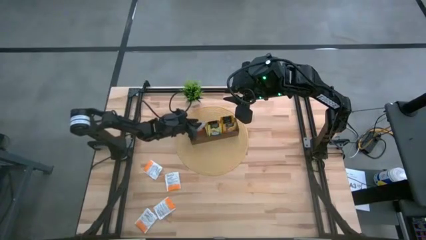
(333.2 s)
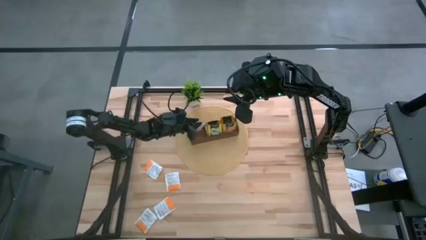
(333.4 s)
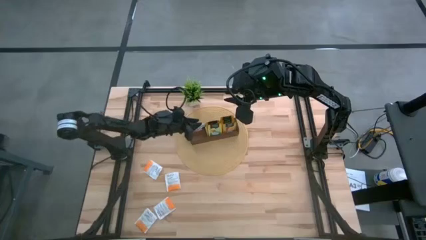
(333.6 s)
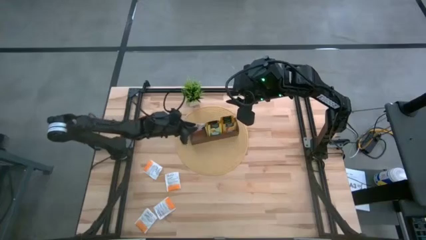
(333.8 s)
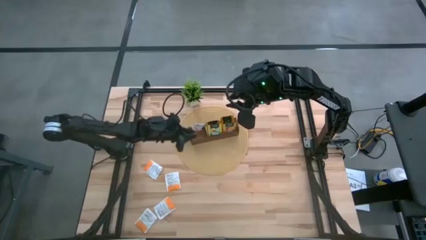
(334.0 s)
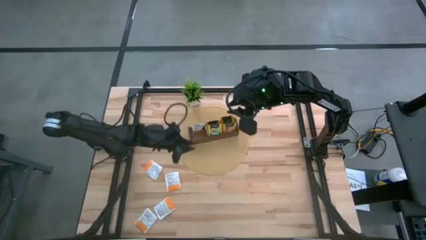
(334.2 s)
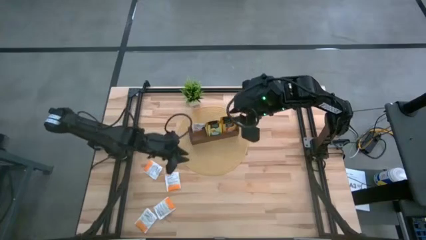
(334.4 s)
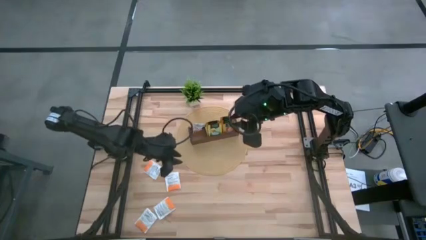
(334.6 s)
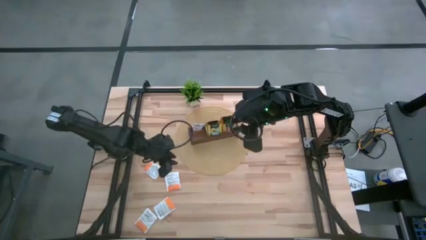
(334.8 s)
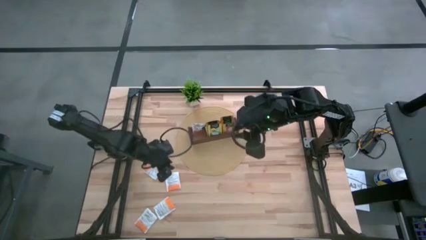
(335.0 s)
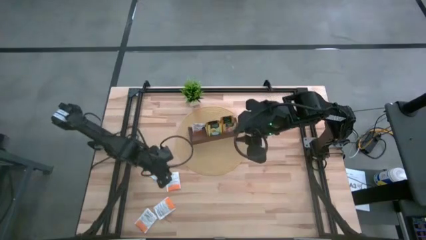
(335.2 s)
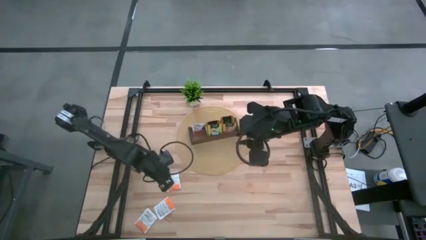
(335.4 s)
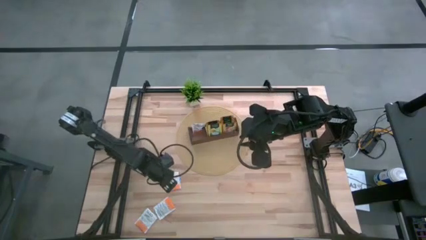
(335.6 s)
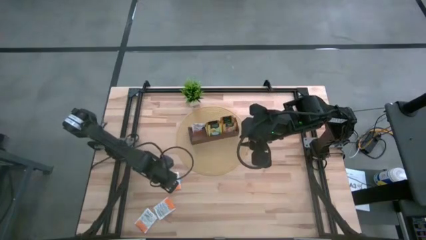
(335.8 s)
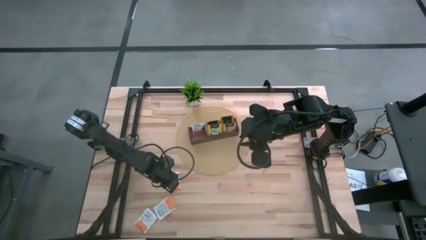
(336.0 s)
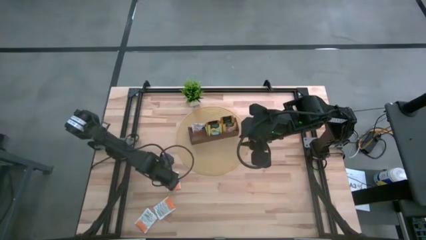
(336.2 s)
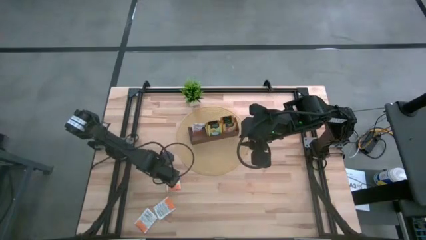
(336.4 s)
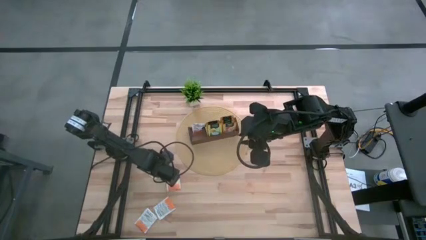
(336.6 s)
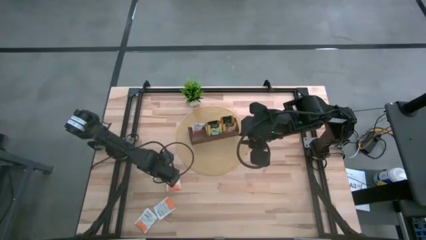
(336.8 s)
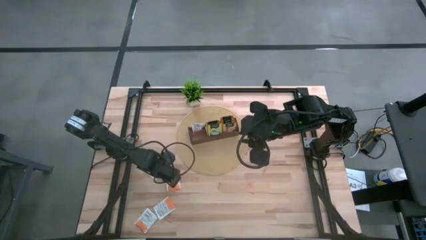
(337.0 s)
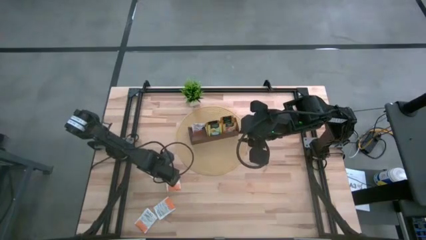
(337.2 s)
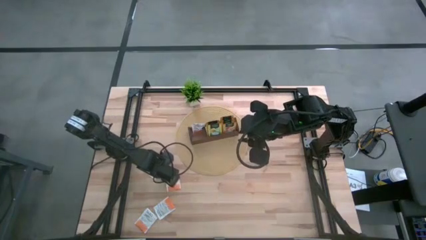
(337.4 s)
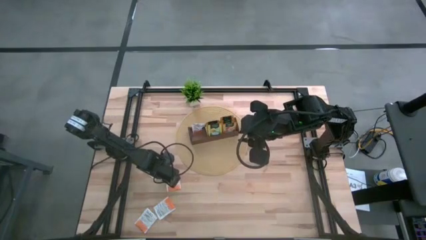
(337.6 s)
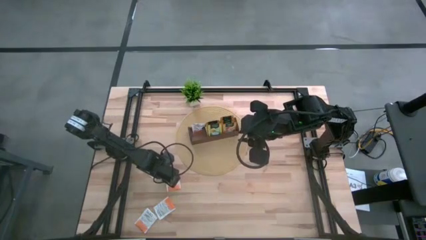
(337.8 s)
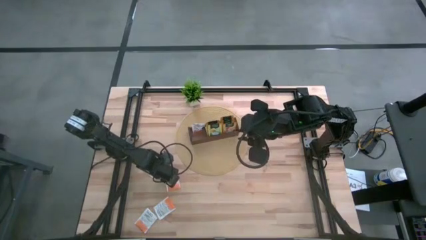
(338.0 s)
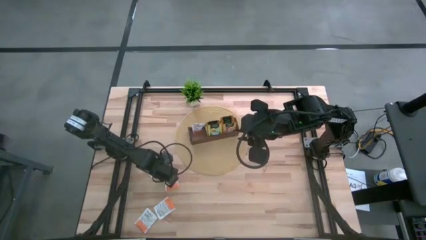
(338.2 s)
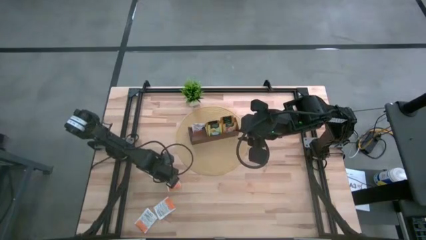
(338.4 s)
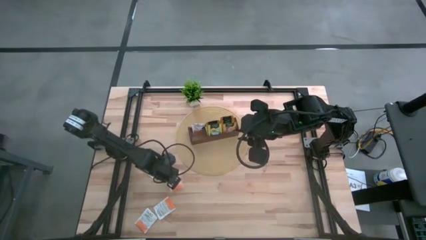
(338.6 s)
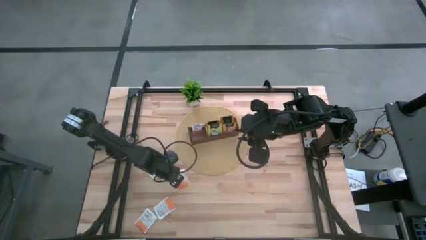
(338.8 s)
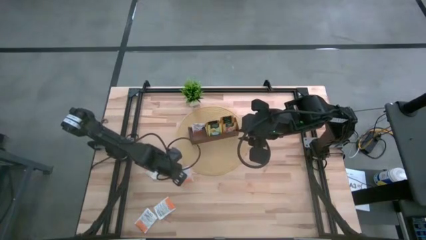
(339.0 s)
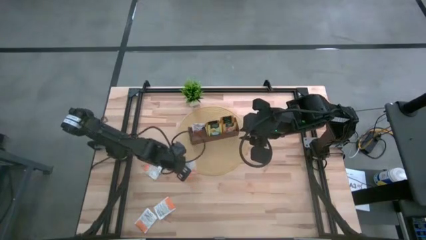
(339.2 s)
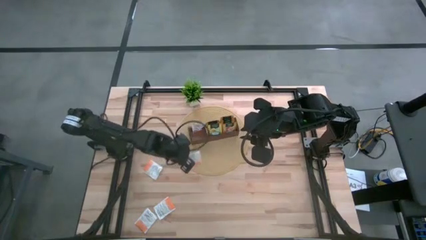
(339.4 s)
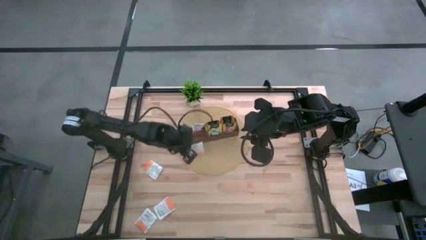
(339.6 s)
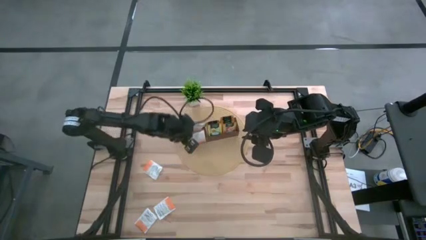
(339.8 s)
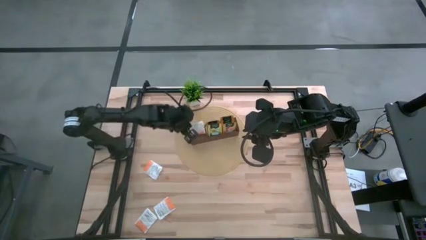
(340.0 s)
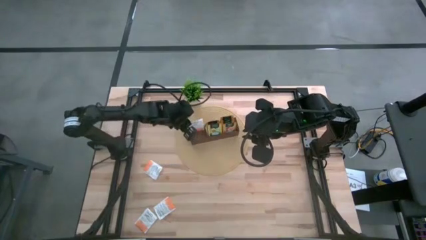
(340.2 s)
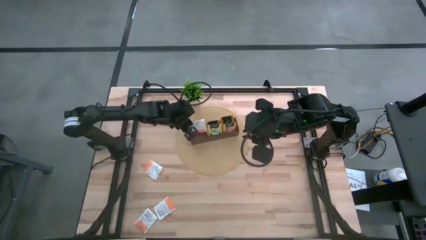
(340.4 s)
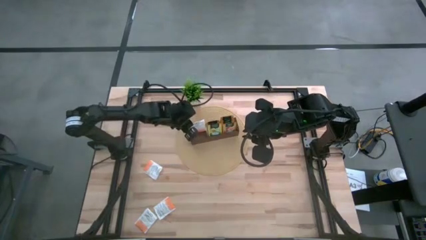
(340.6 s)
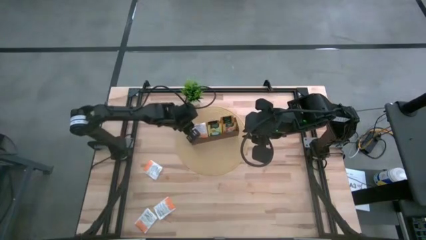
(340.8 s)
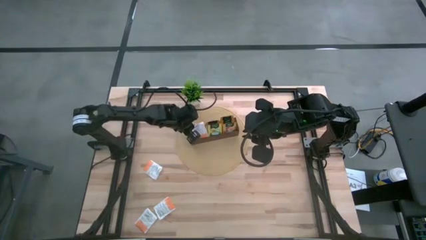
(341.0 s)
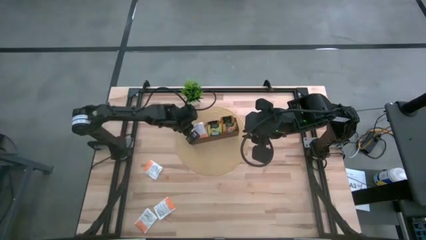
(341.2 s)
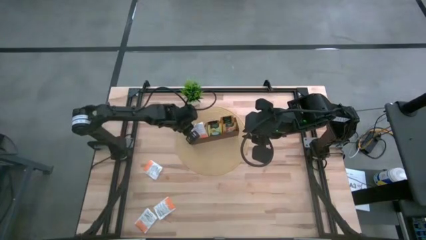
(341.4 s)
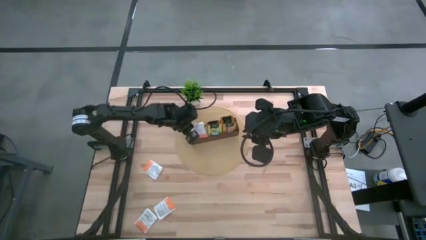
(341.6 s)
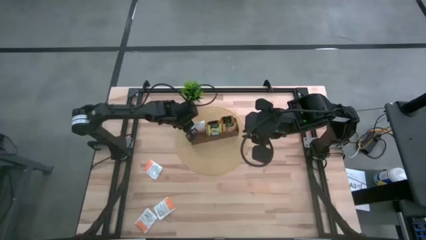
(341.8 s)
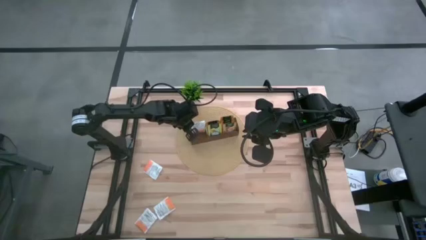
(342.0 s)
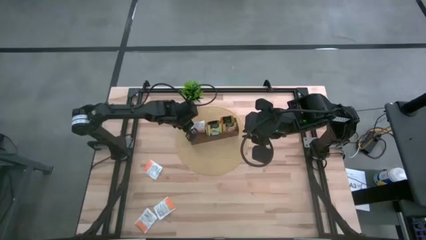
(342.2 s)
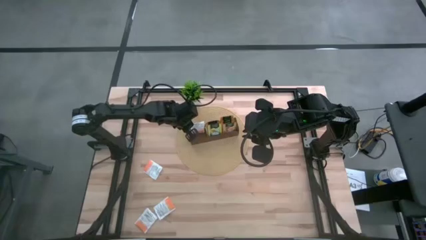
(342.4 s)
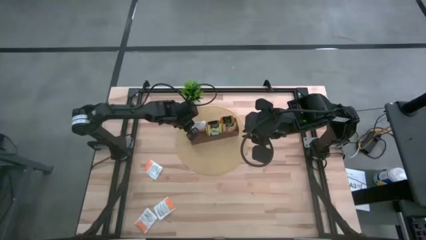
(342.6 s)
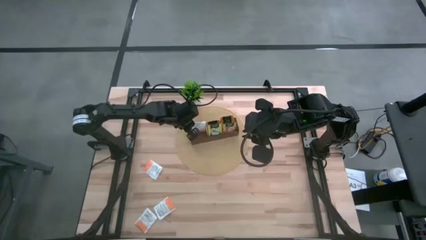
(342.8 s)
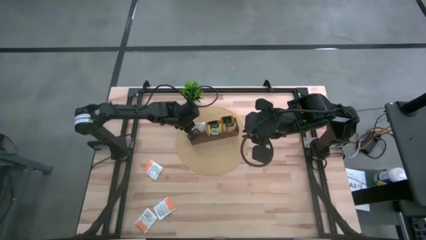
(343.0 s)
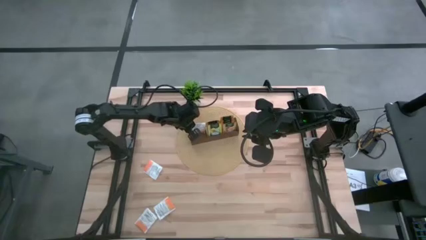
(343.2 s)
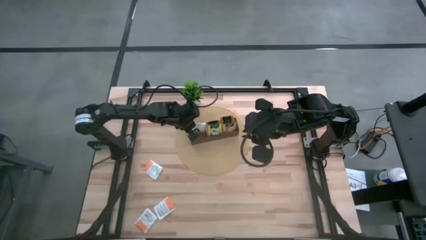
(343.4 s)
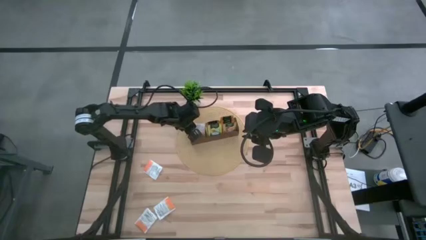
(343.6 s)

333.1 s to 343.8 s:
Task: Pick & Place Tea
Put the white tea bag into the left section of the wooden organizer

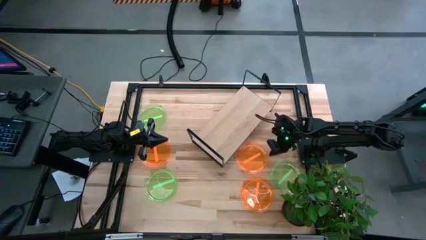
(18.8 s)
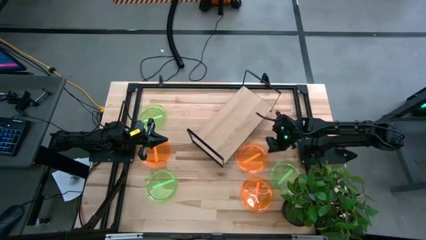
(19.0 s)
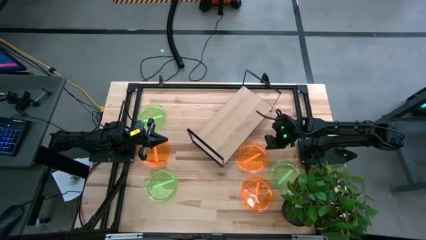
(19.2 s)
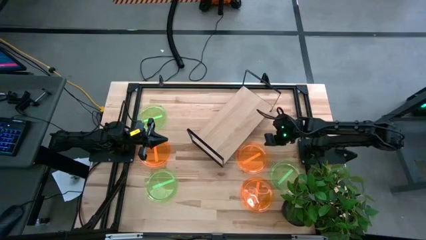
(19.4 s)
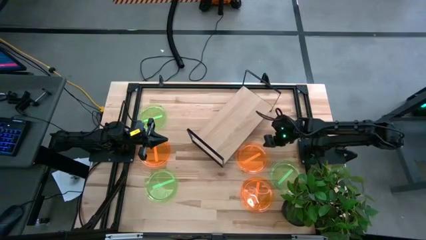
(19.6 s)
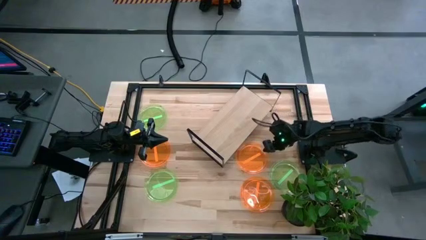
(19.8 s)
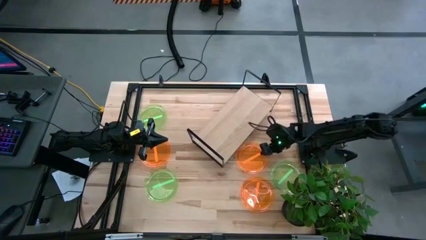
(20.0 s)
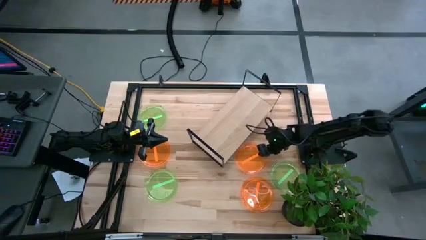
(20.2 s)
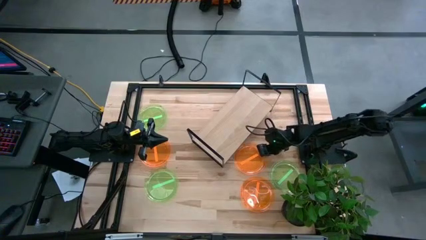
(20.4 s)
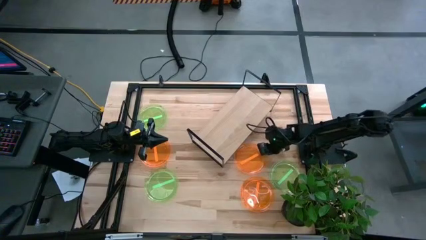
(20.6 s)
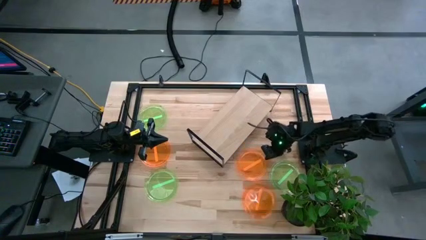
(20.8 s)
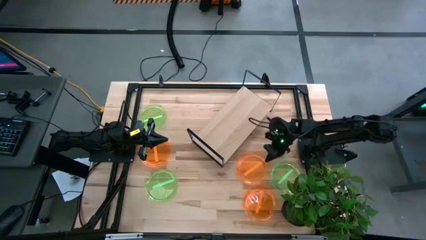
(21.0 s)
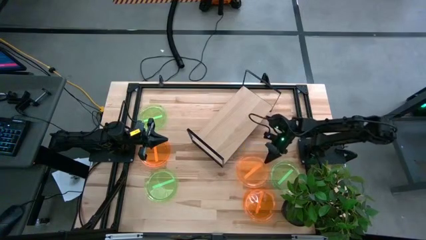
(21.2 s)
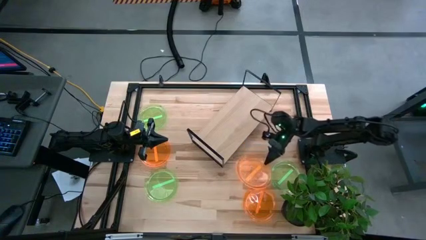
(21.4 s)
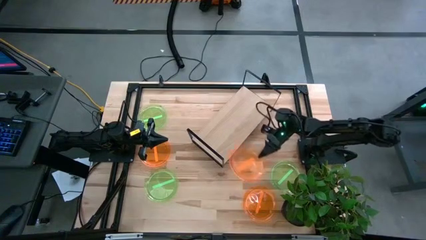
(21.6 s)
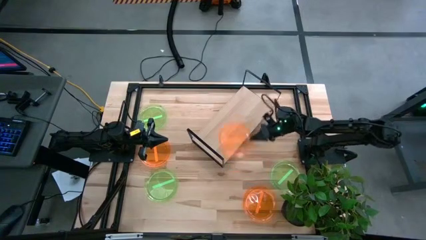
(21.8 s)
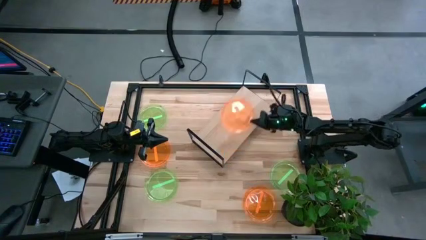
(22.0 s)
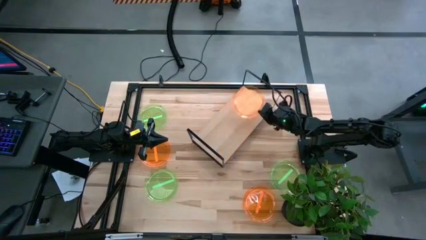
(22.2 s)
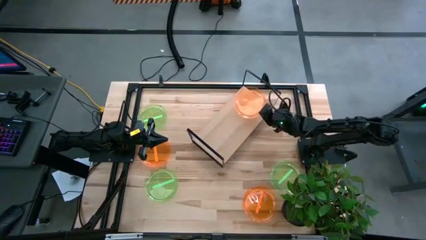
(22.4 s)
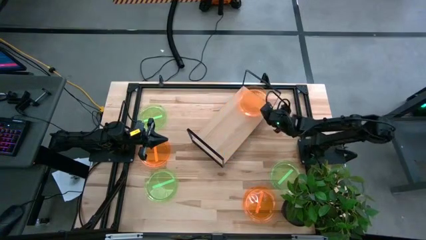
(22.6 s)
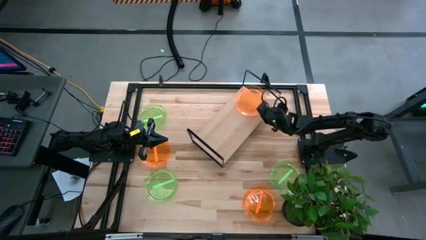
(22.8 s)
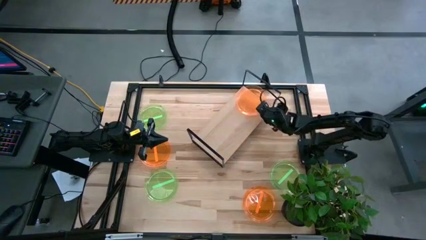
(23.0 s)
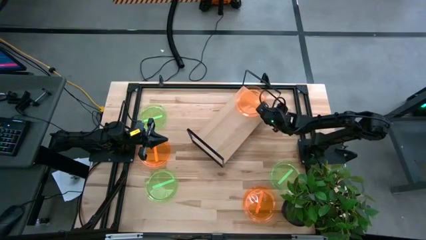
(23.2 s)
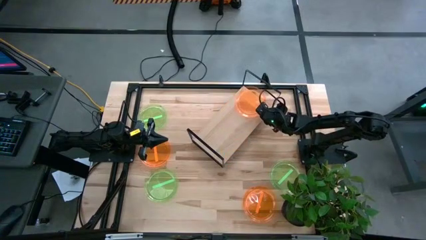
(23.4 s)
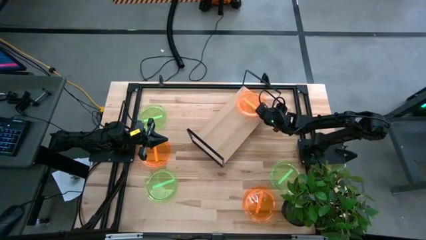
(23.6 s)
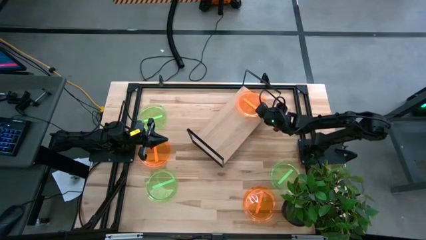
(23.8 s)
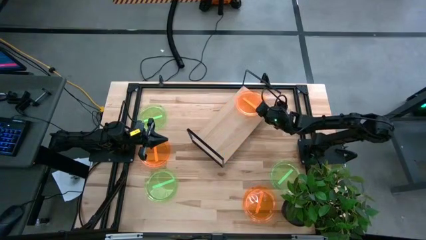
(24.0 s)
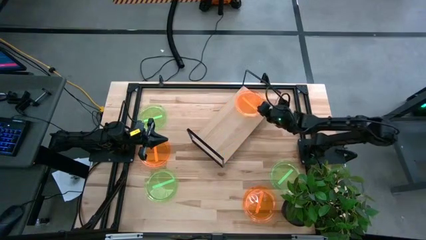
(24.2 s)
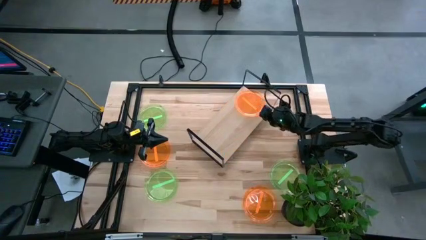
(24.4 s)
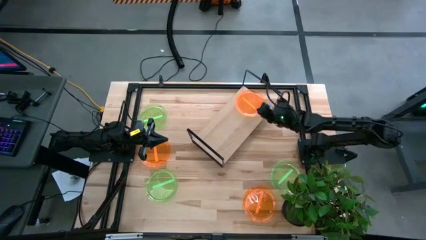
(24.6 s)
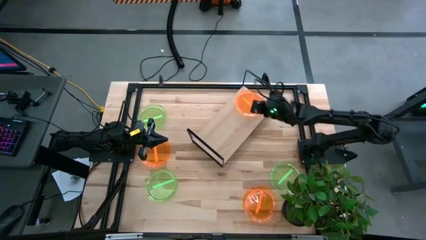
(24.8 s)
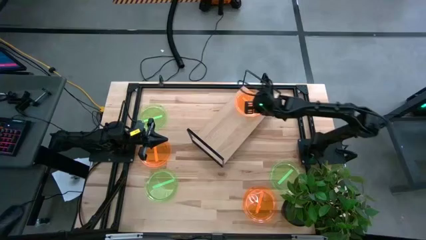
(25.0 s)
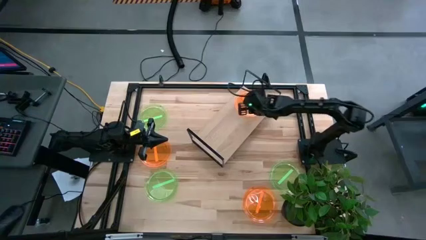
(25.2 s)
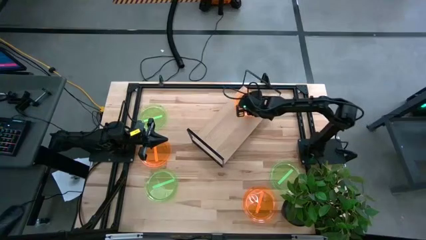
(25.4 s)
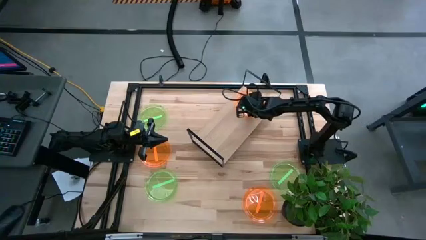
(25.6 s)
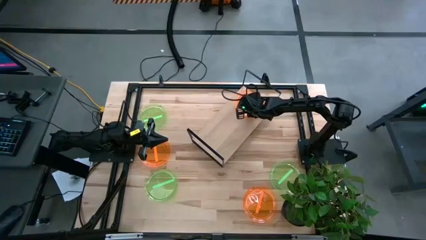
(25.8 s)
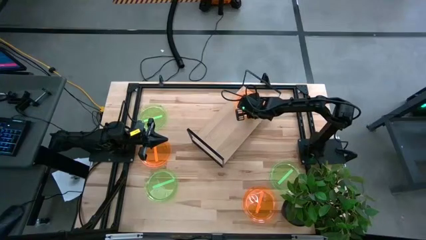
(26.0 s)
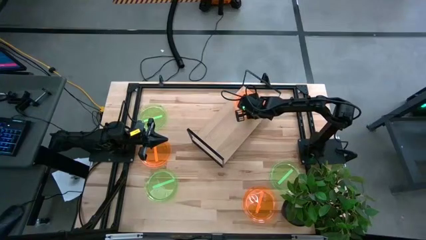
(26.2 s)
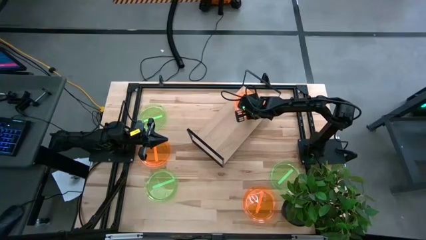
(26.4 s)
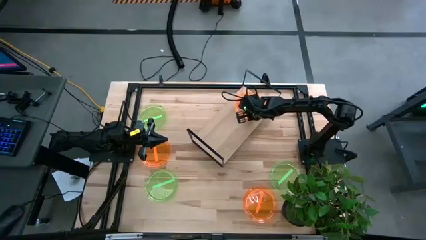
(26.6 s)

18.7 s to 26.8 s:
Task: Place and stack plates onto a shelf
Put the top right orange plate on the shelf
